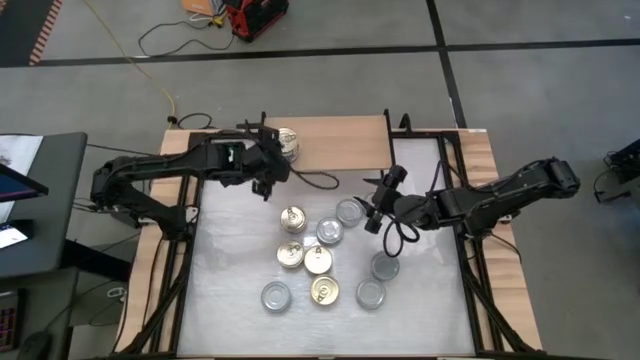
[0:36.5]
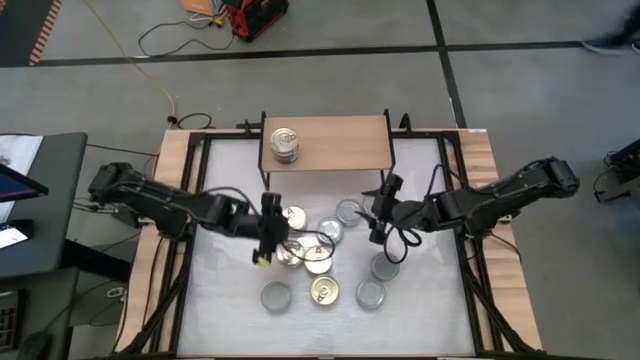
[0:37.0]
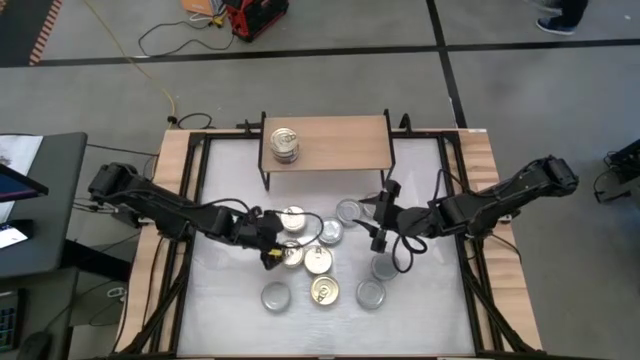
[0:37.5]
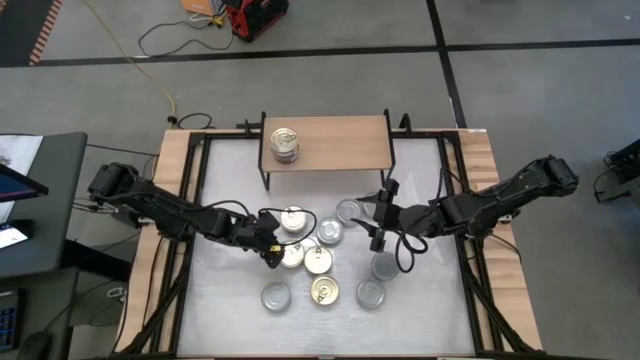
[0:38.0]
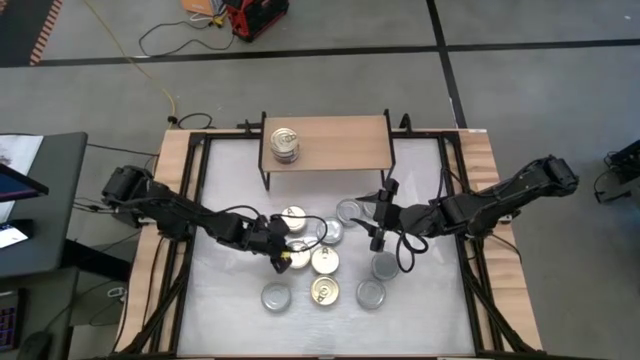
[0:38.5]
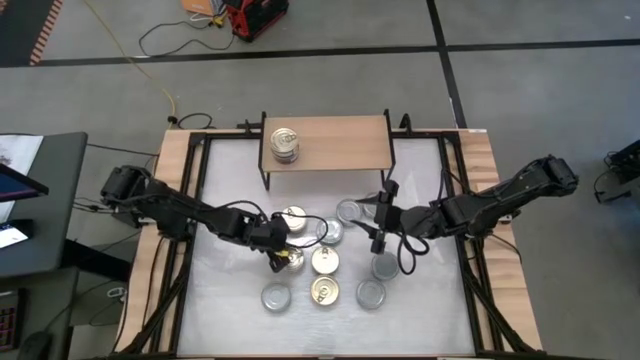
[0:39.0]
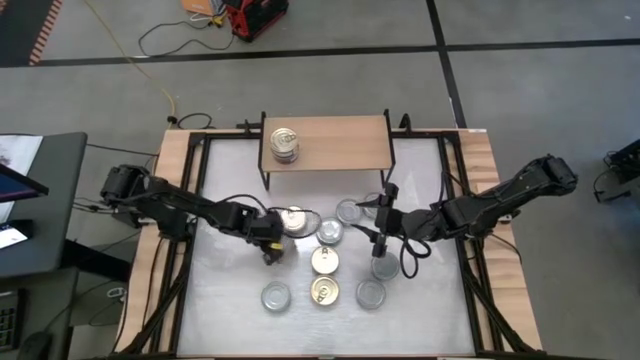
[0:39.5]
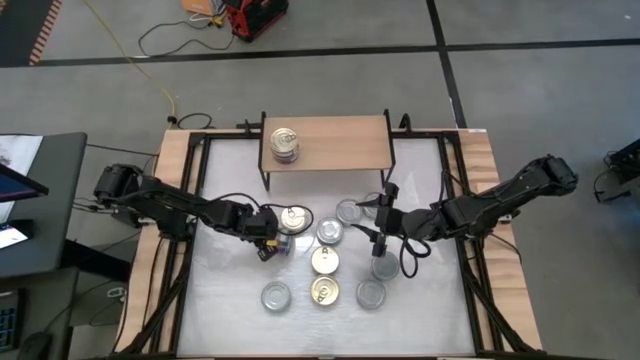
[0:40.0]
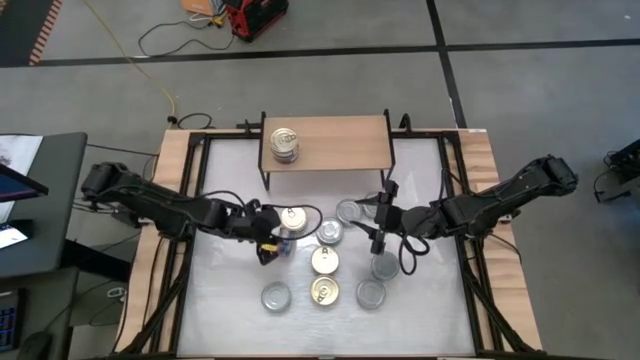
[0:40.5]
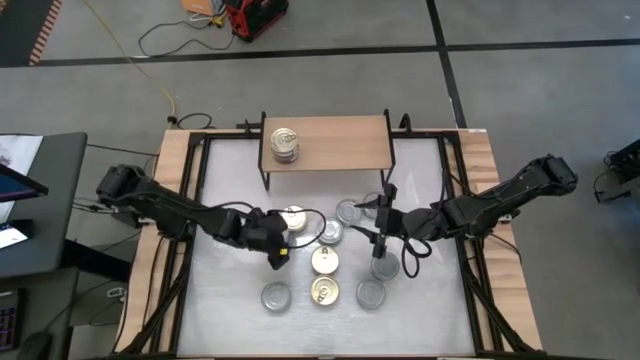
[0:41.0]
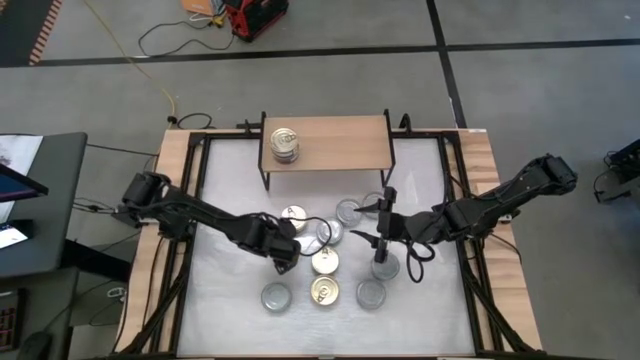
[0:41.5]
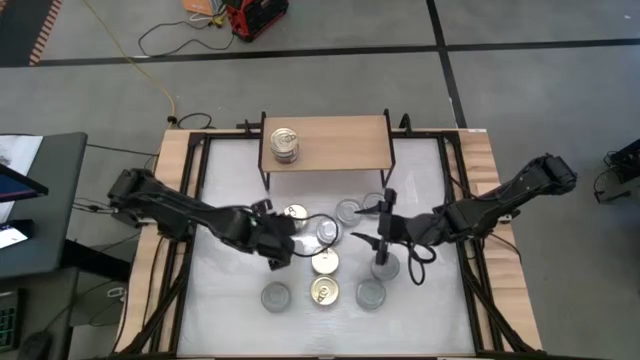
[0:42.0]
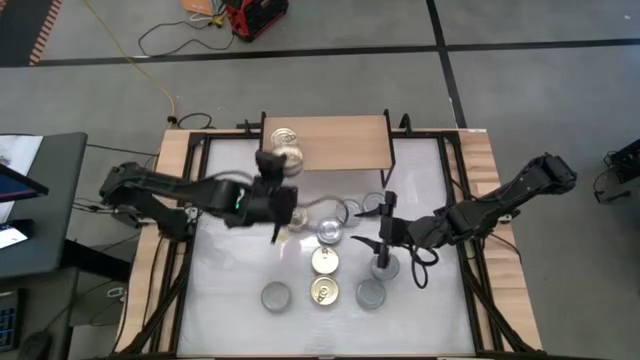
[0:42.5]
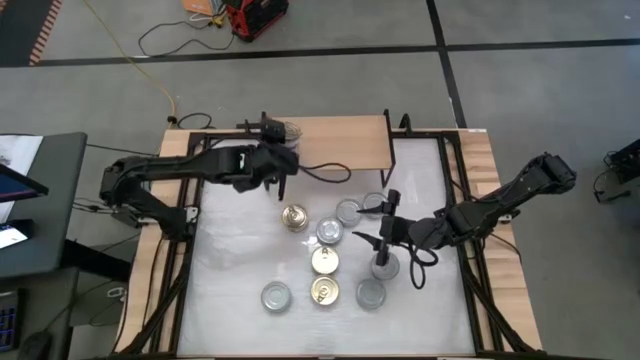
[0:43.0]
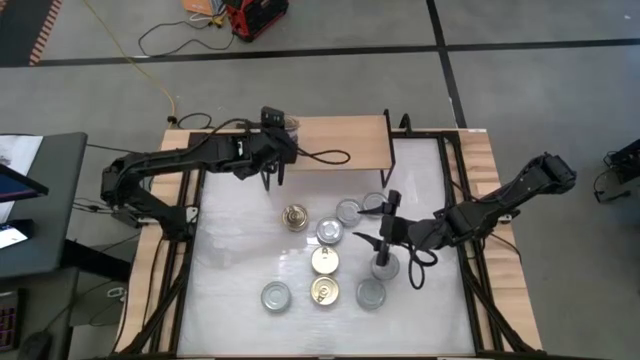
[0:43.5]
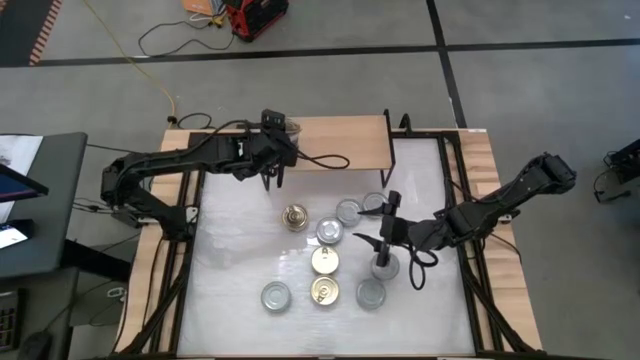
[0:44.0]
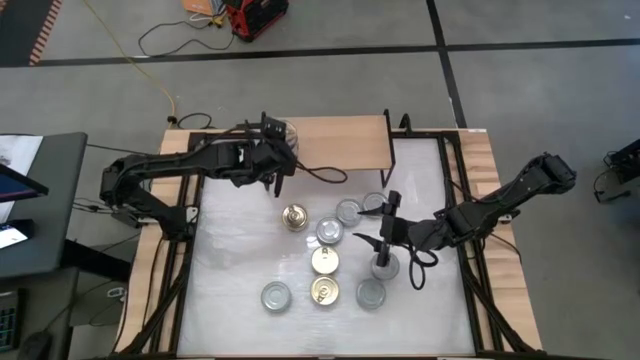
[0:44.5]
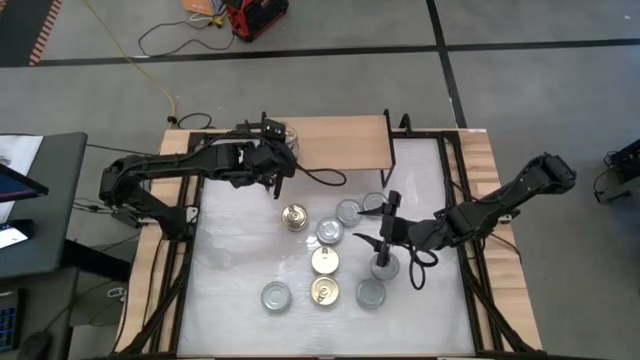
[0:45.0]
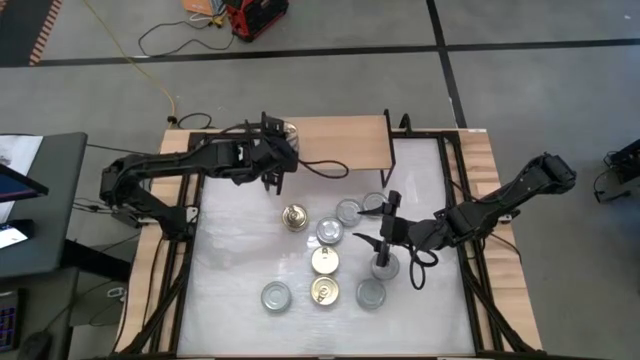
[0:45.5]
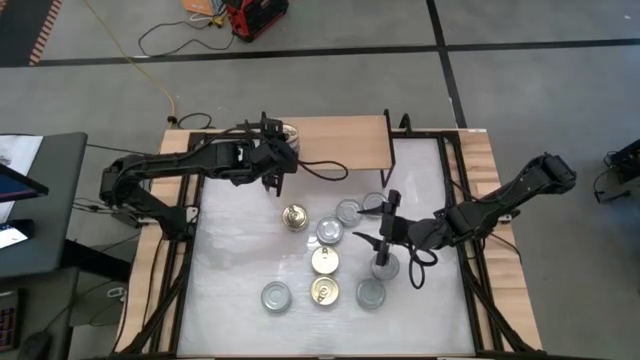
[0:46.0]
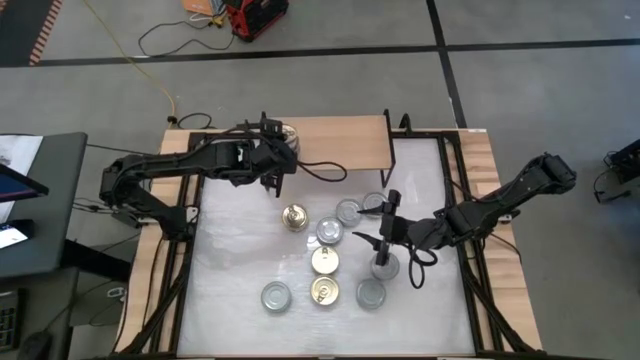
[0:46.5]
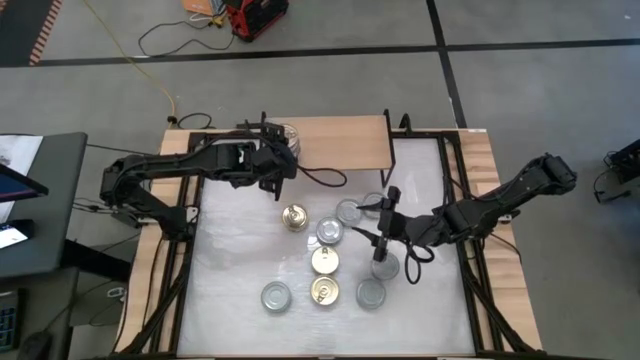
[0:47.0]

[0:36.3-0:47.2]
Task: Stack canned seafood by type on shelf
Stack the blue tuna can on top of the blue tuna can

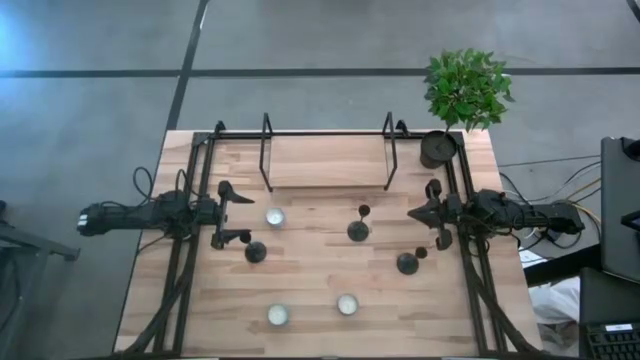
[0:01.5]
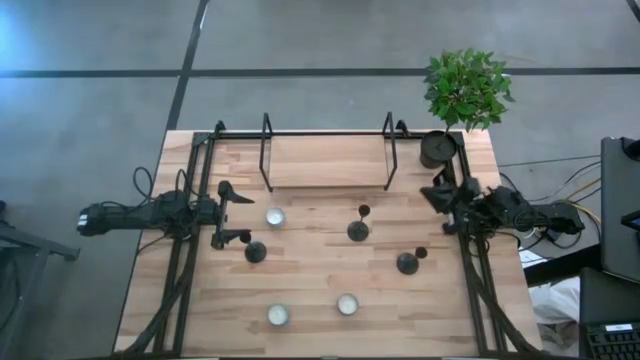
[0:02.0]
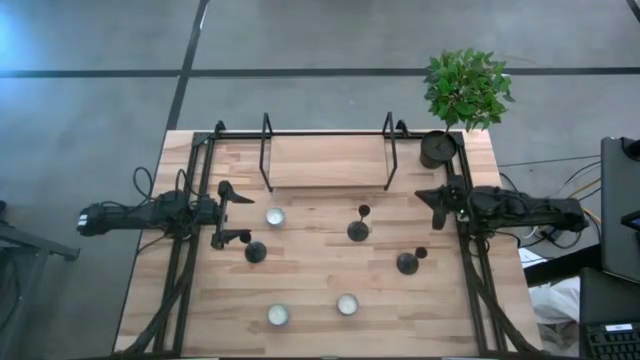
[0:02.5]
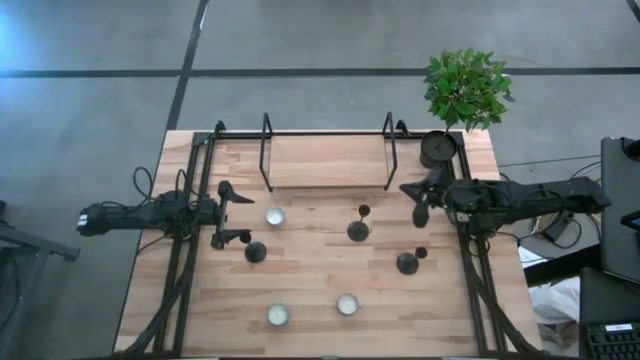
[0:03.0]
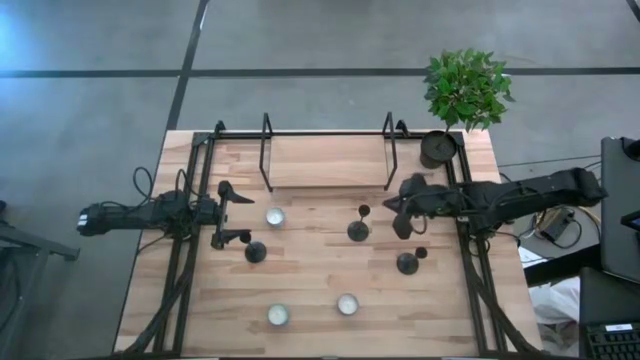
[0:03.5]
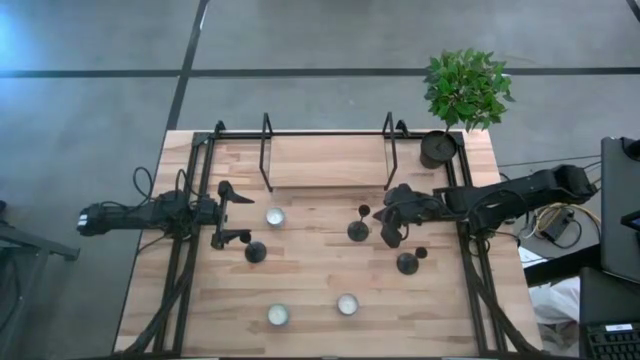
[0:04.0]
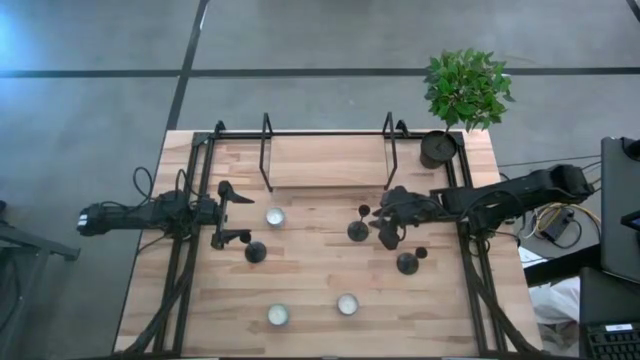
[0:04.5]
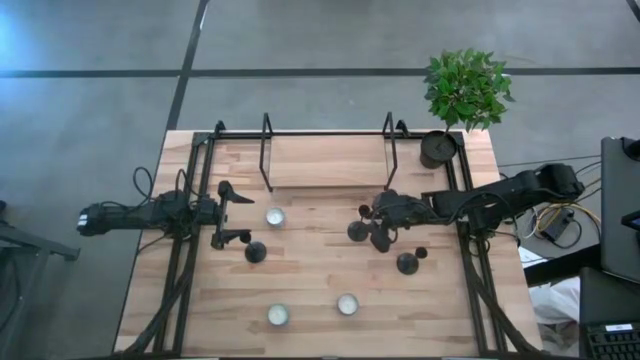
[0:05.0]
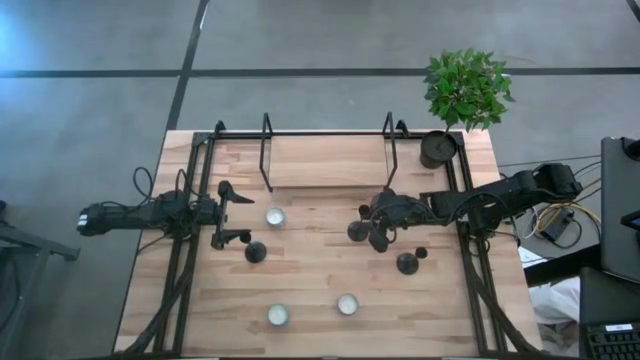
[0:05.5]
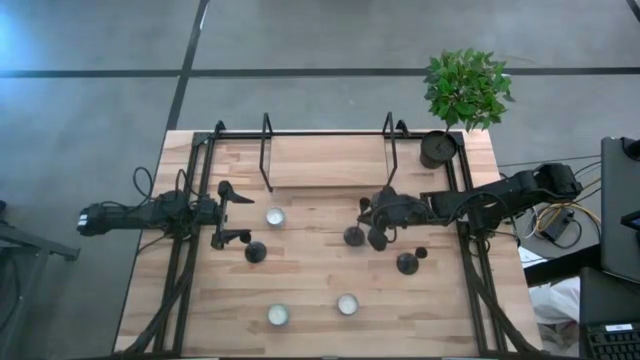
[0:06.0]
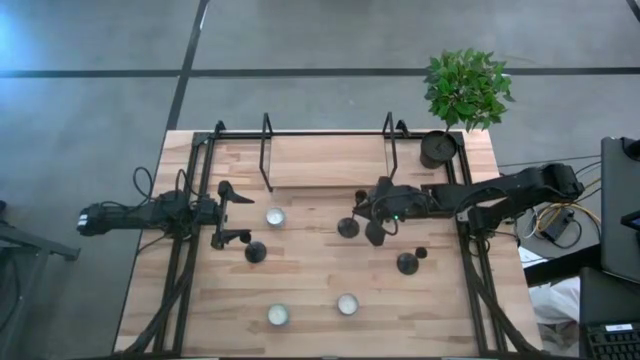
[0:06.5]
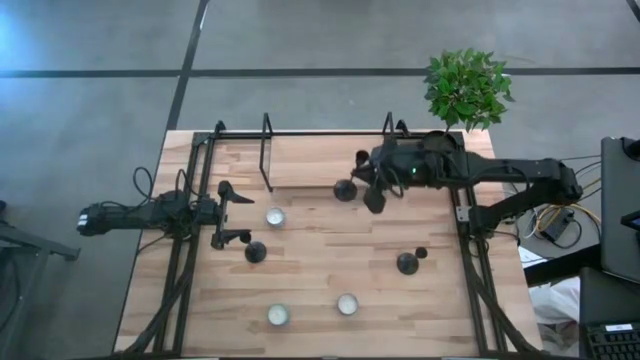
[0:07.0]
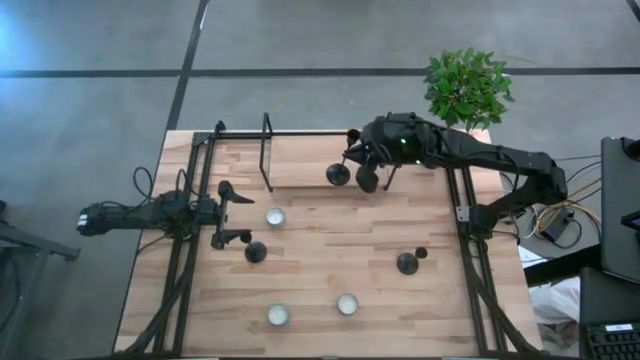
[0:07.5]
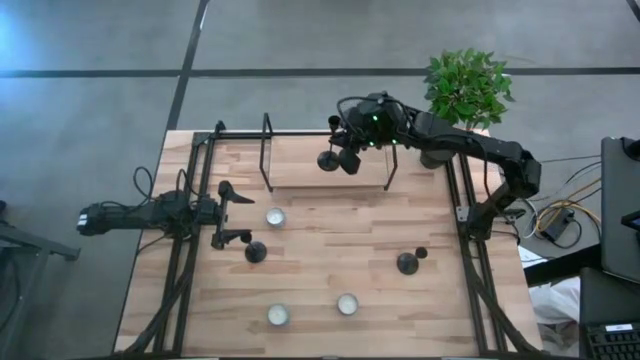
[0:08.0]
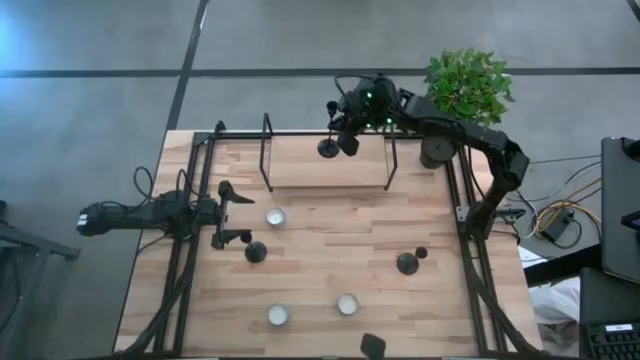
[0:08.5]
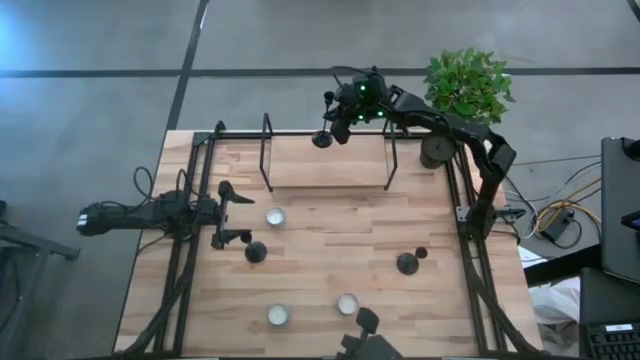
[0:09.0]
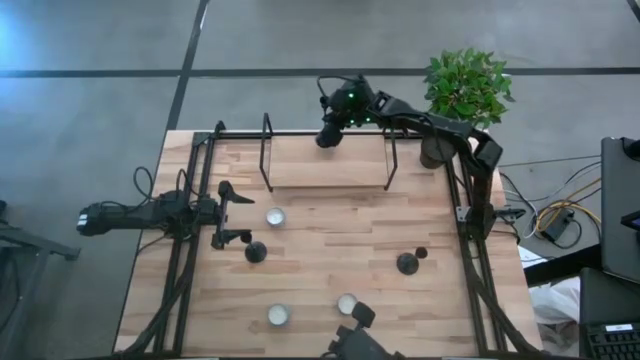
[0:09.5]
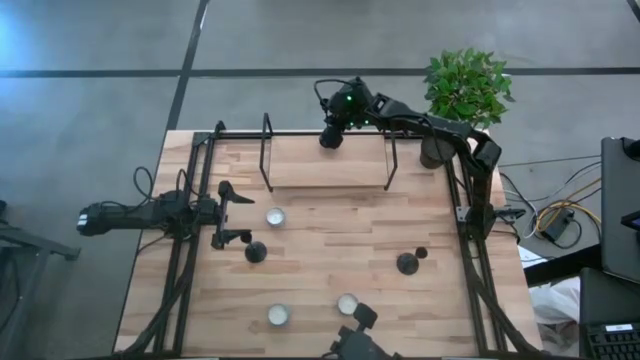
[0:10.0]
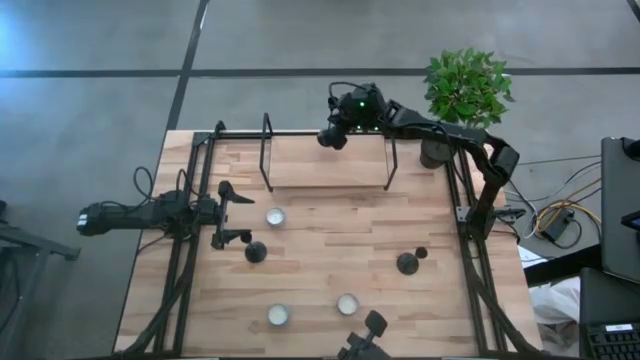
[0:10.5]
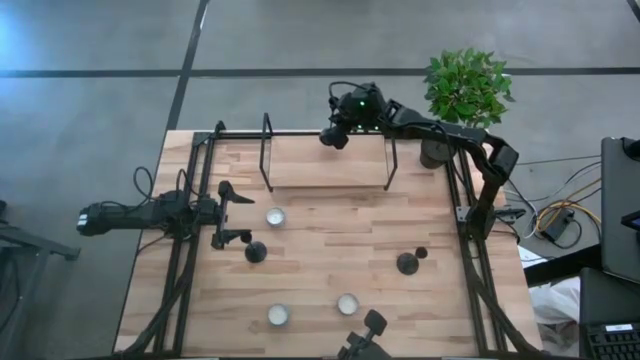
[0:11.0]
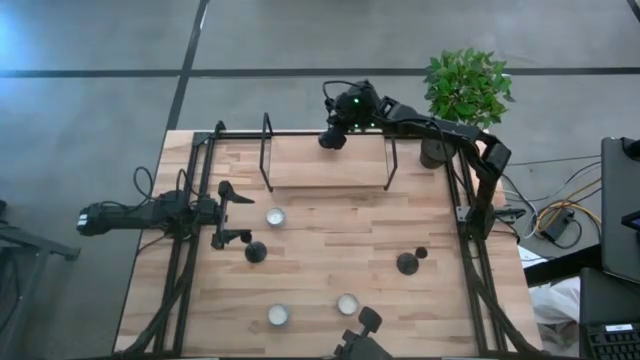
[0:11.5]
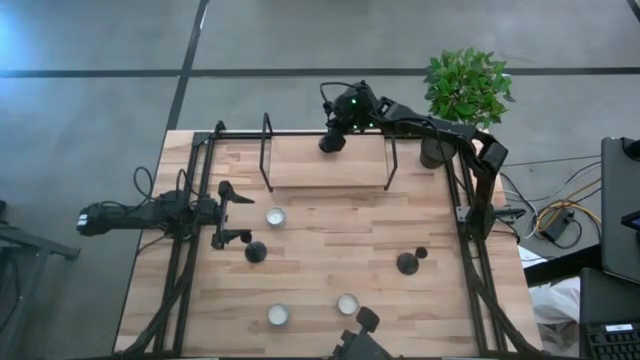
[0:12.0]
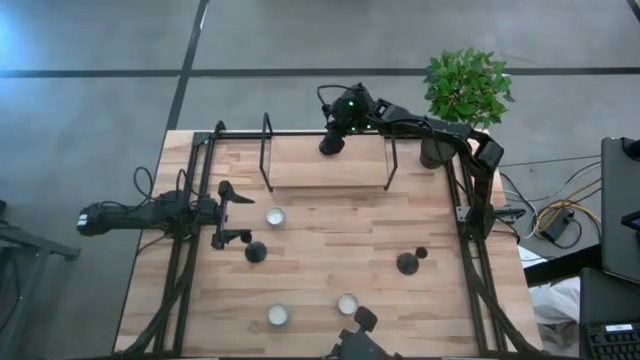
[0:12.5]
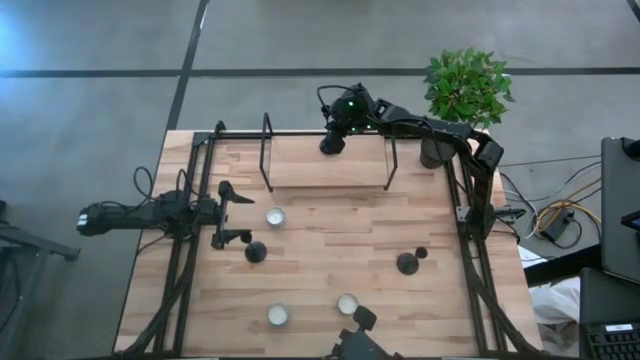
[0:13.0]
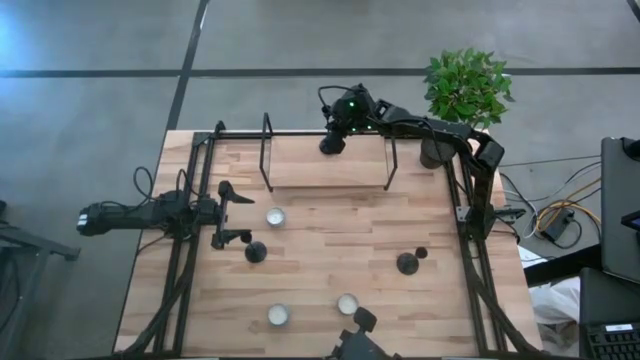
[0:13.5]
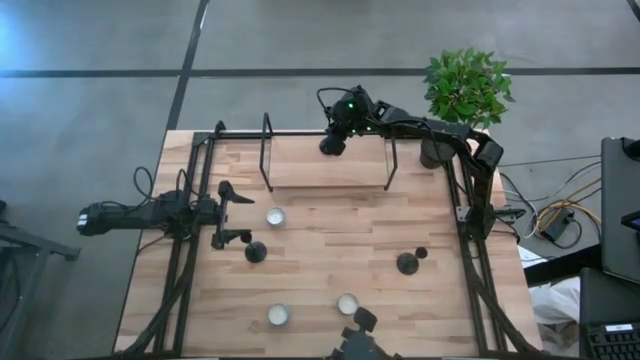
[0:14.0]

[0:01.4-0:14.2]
Task: Pick & Place candle stick holders
Put the top black candle holder on the shelf
